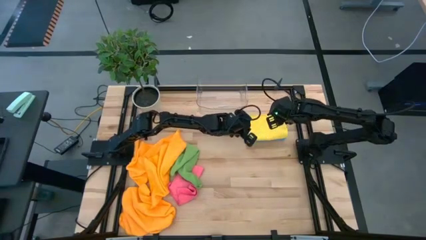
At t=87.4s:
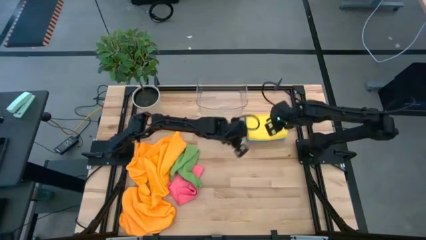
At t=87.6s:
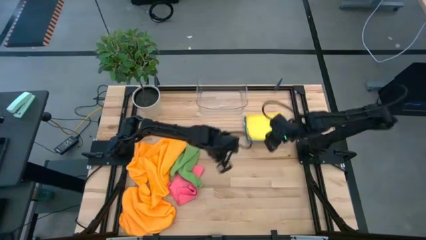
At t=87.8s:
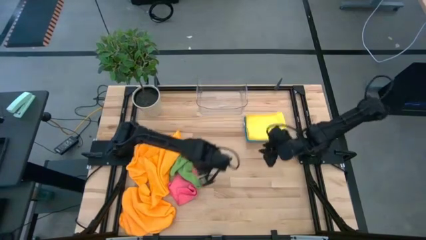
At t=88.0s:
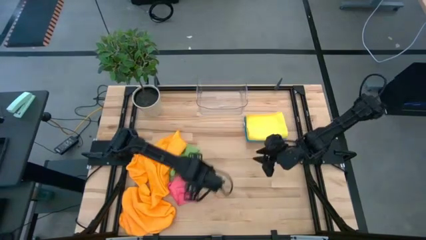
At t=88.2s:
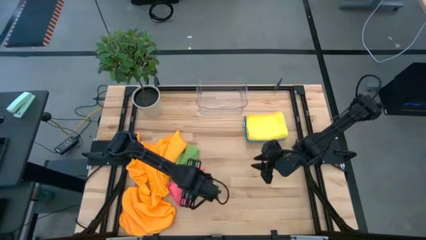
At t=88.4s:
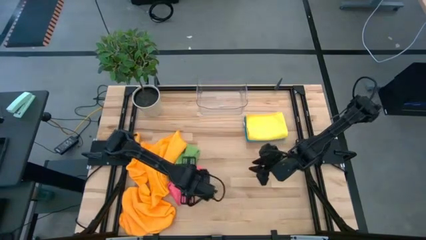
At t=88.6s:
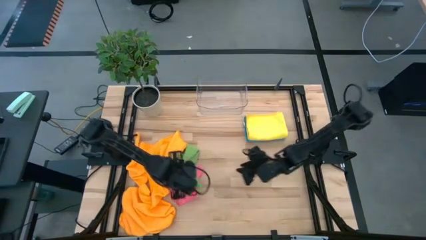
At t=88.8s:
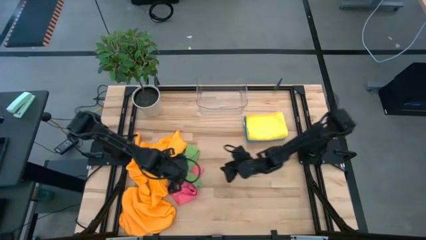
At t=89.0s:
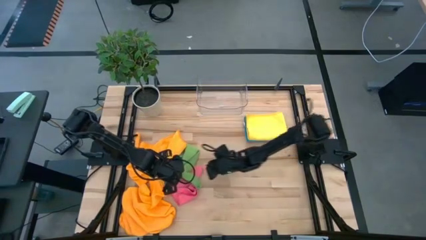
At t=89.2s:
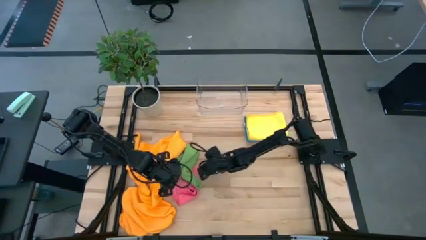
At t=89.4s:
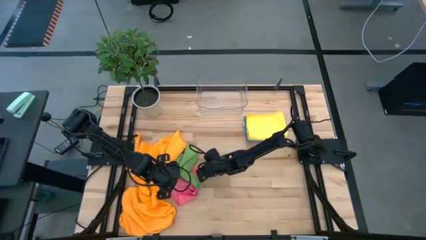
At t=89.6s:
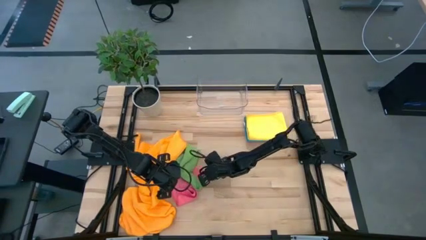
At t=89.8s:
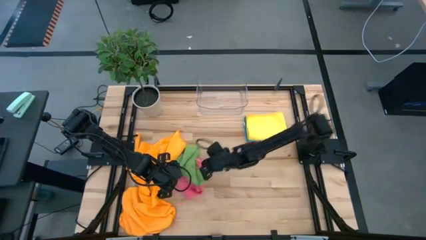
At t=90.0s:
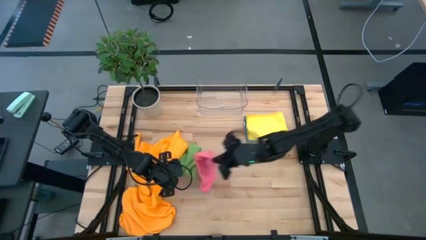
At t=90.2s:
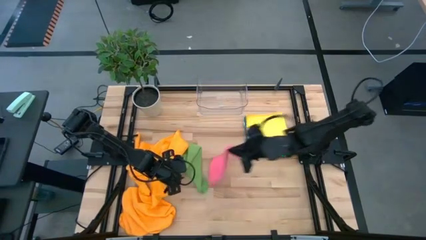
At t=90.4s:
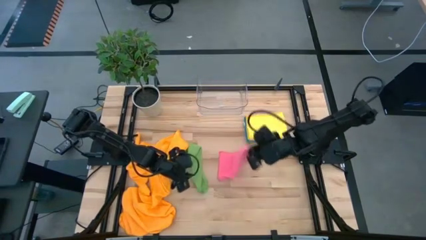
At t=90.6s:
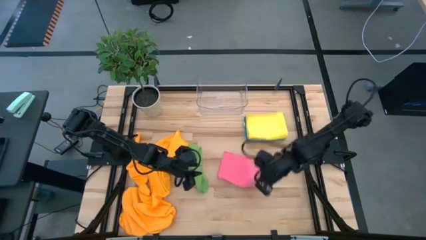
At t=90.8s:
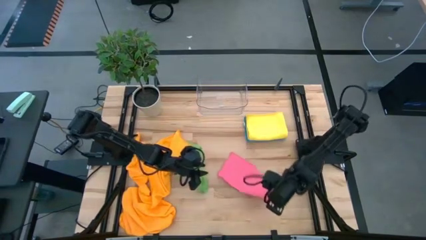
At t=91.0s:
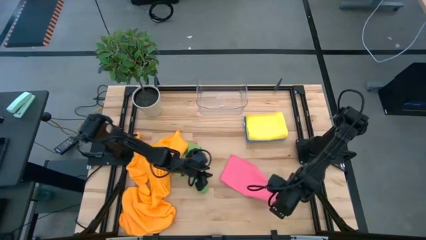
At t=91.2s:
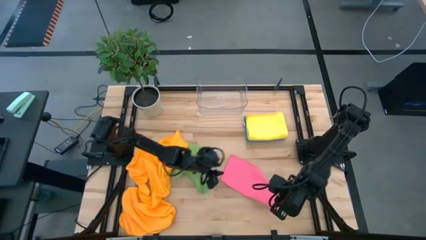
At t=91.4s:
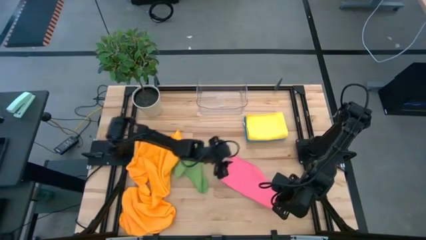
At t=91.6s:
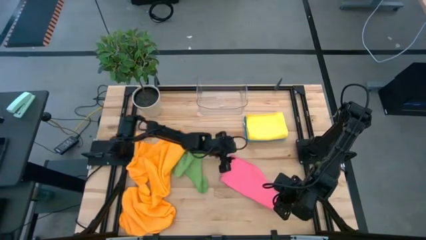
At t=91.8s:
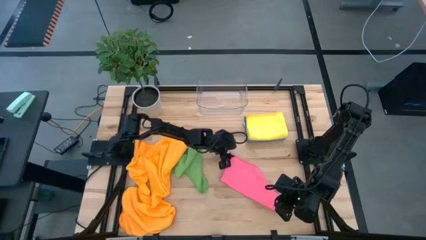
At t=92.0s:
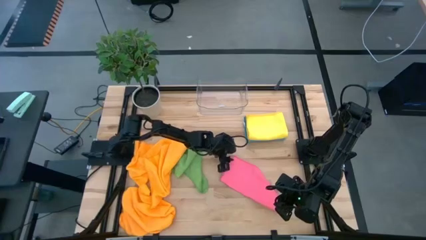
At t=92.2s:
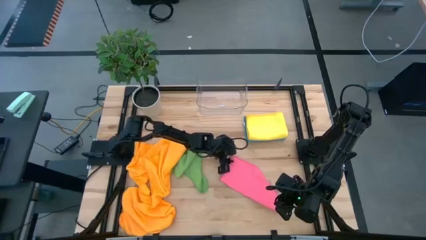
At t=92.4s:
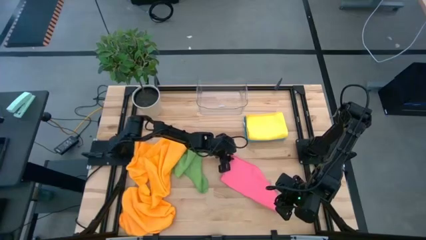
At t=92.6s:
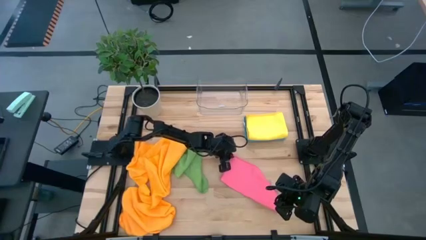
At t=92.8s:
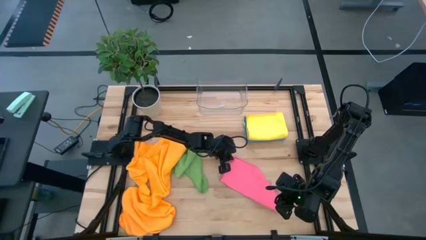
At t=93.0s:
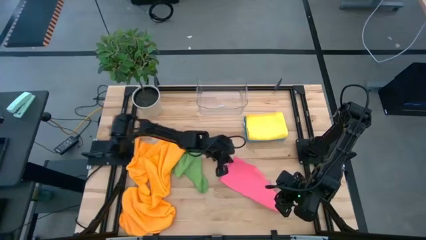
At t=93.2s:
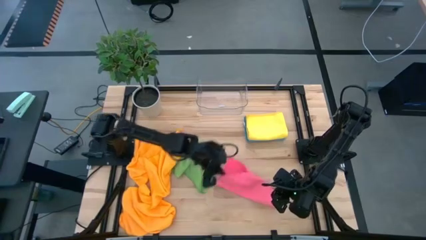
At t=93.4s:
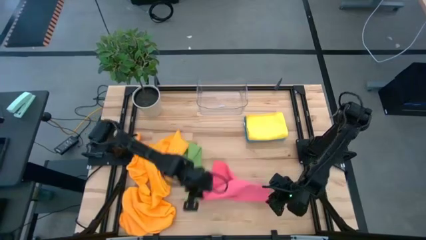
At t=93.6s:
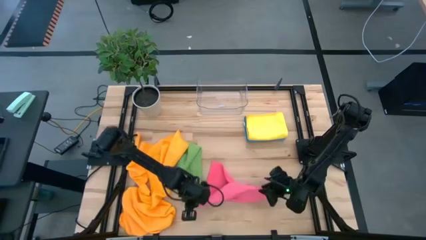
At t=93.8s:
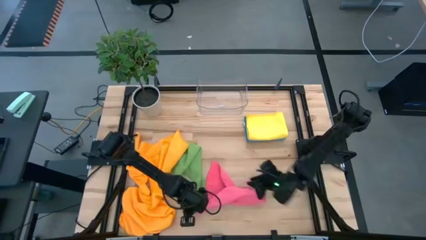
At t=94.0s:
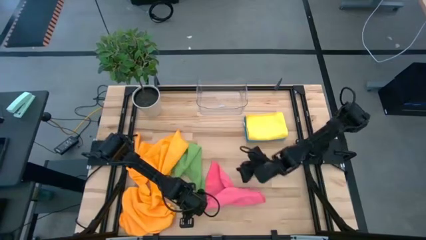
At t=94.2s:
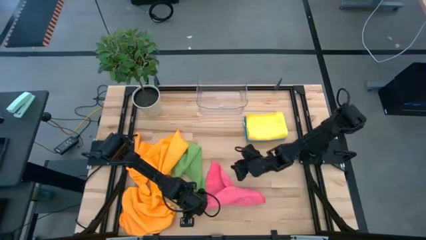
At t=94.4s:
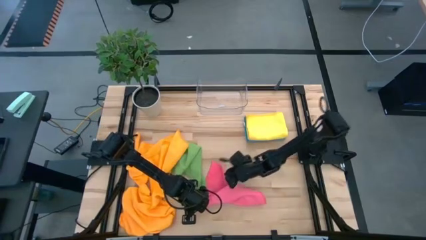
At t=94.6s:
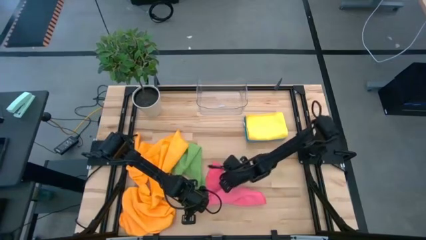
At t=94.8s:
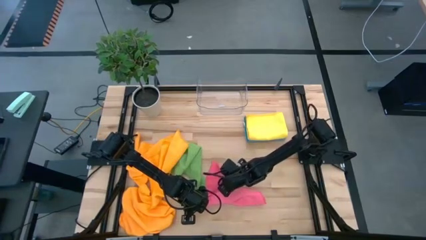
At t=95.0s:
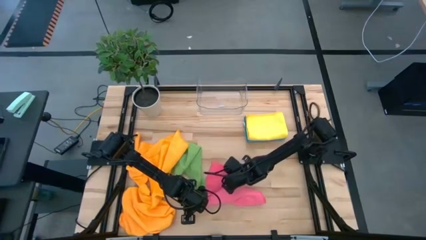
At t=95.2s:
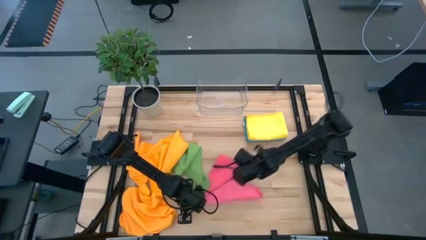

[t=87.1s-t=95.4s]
Task: Fold microfiber towels
Fold the pink towel

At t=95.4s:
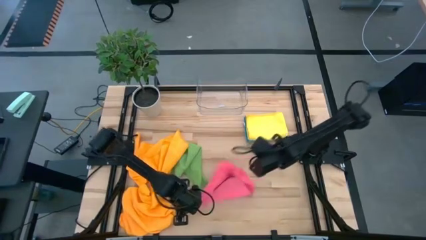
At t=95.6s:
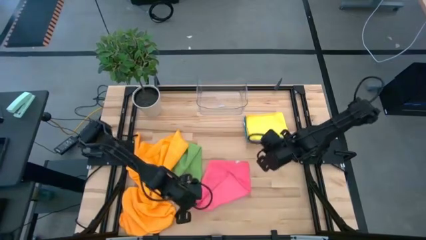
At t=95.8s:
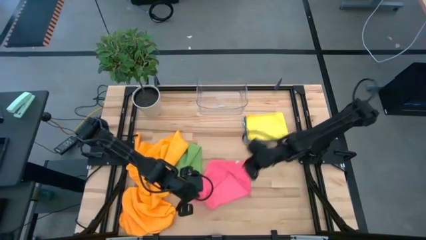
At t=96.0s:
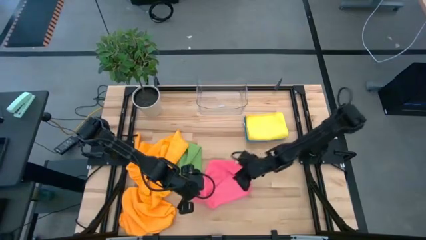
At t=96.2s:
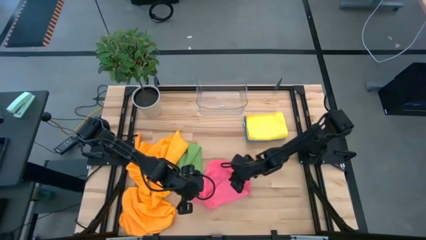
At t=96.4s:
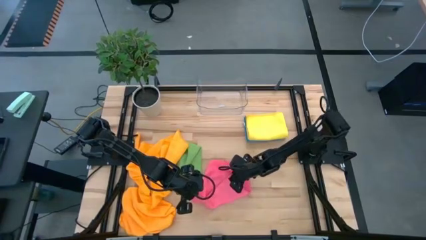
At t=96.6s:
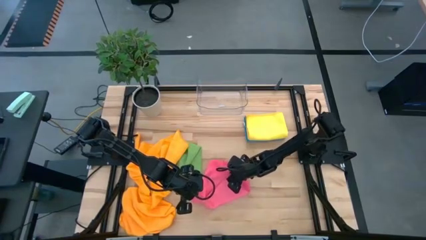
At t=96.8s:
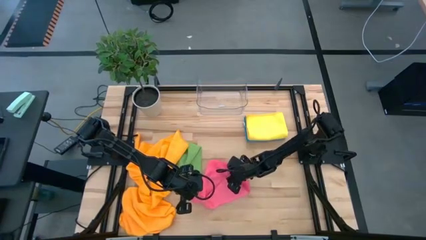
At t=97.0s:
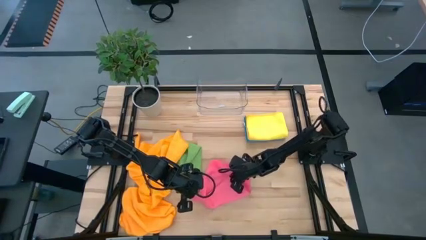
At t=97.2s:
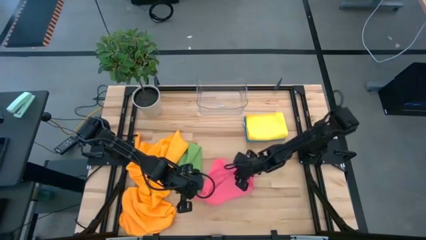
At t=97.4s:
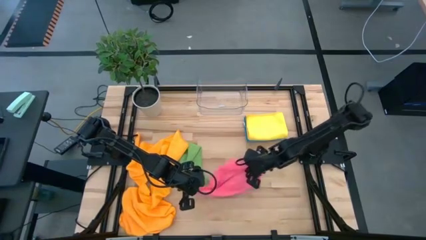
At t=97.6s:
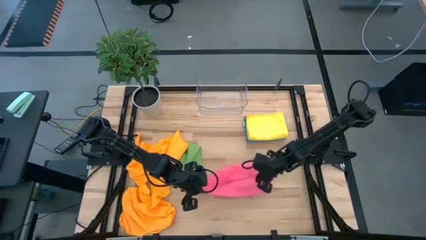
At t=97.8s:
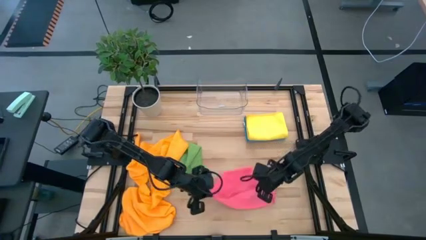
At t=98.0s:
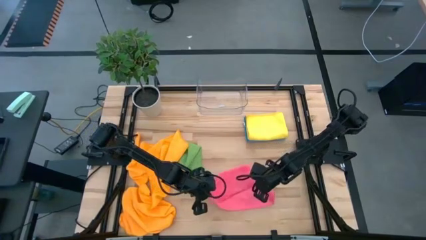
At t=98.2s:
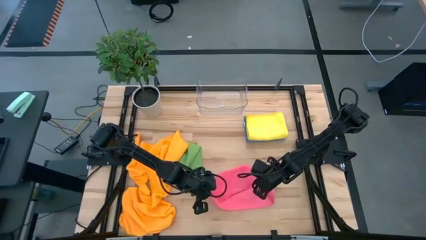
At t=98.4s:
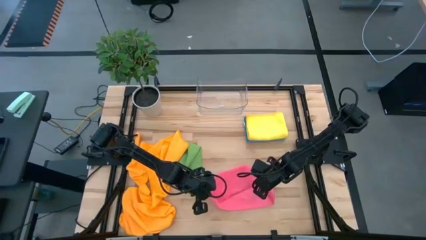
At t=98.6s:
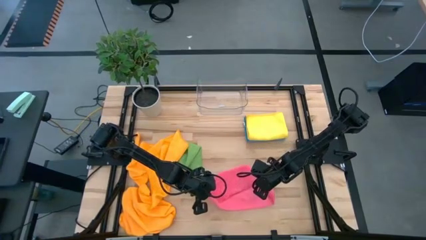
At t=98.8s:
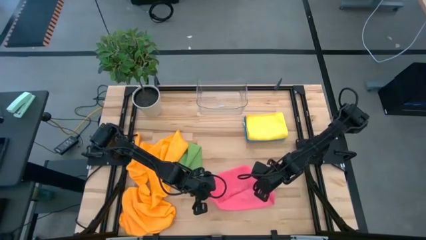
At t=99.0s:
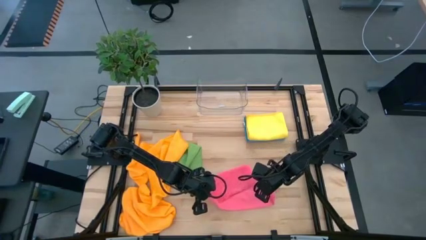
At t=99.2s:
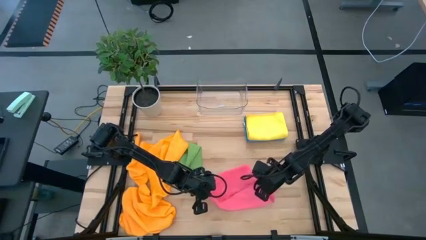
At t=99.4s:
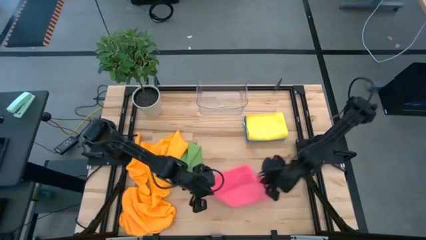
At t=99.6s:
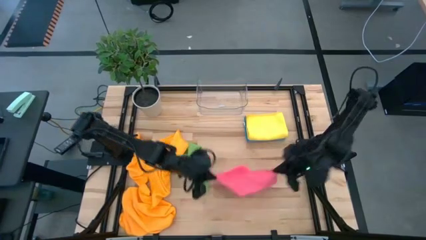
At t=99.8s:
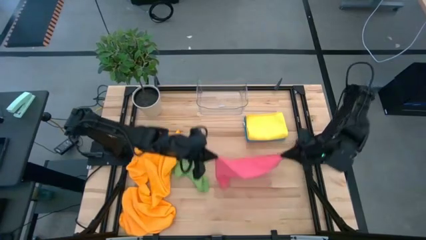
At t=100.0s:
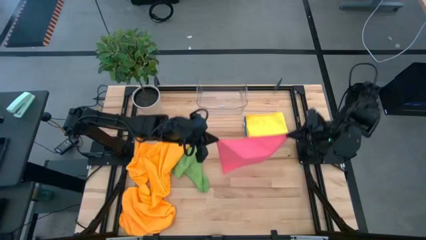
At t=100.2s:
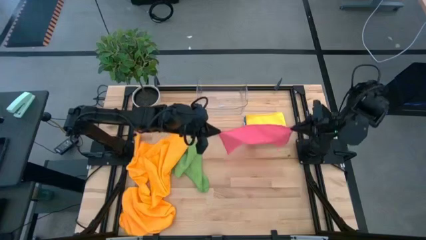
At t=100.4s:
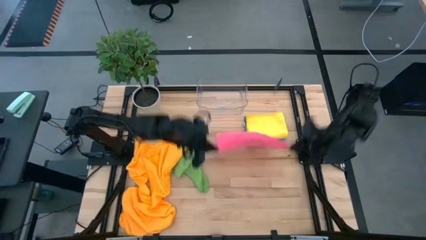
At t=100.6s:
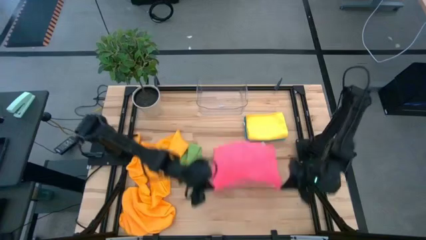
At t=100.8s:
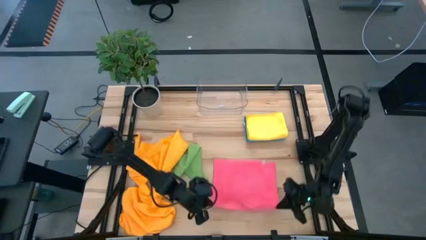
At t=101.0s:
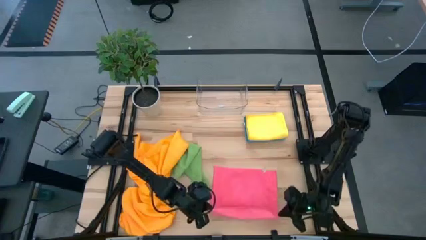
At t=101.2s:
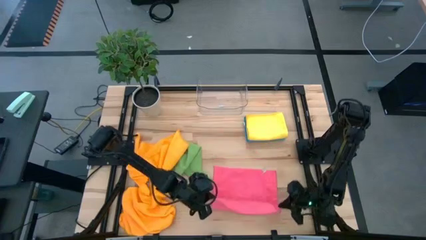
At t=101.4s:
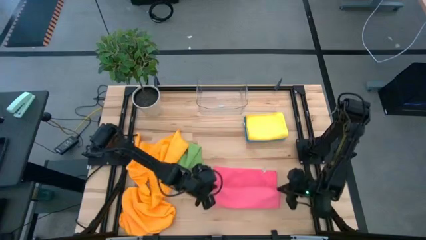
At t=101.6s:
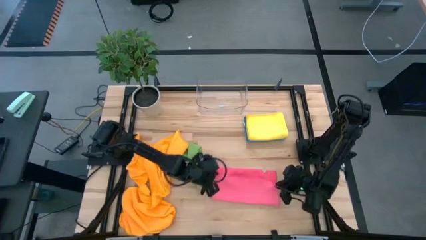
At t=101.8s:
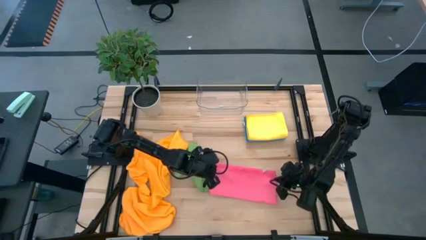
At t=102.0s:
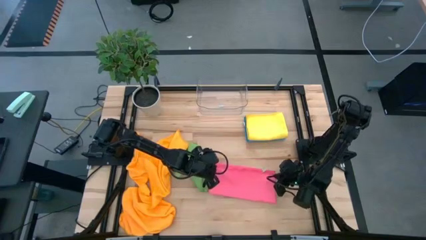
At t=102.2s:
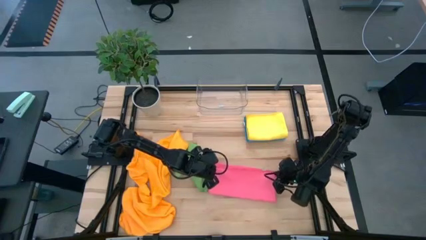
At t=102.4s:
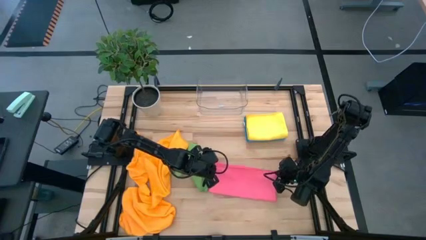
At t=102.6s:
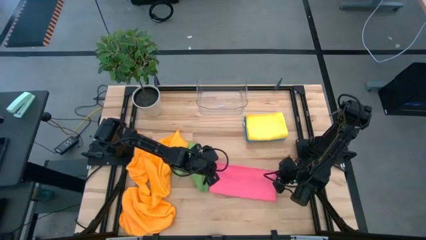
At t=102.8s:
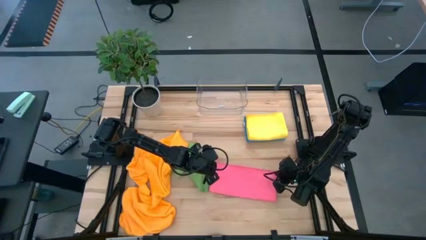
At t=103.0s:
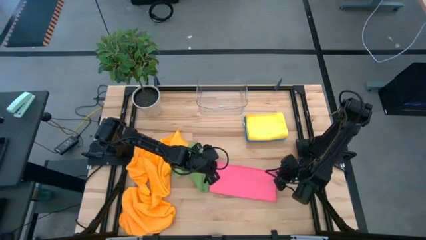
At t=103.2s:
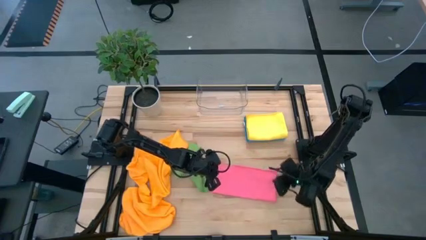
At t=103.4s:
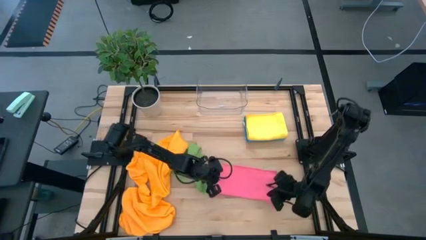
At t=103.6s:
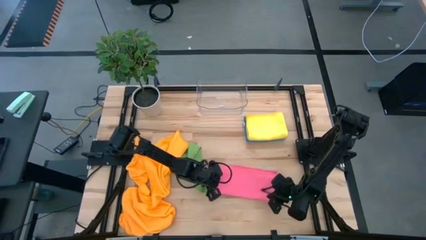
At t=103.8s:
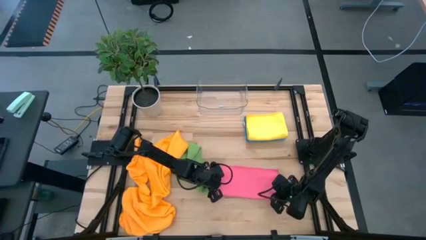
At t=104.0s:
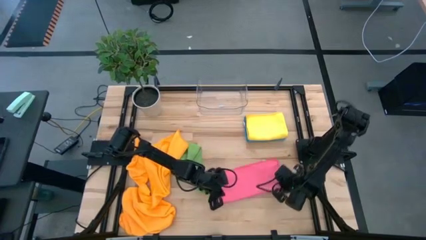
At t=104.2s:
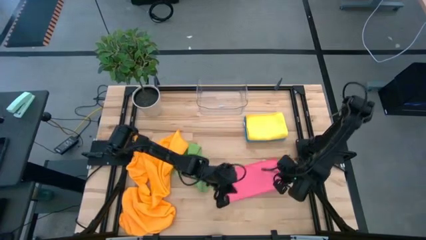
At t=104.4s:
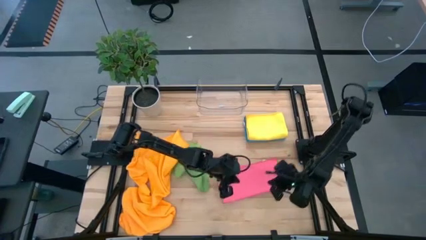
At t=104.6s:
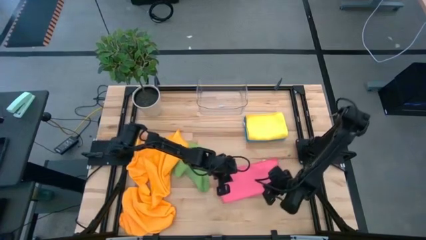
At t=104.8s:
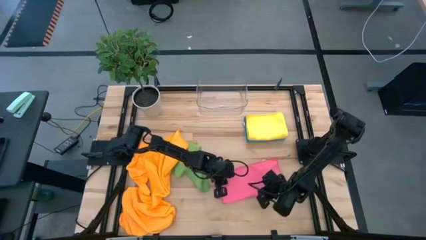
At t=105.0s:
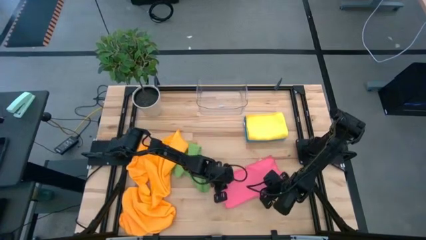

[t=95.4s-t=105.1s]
Fold the pink towel
